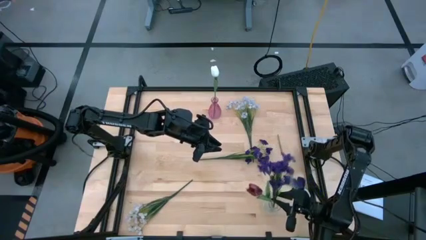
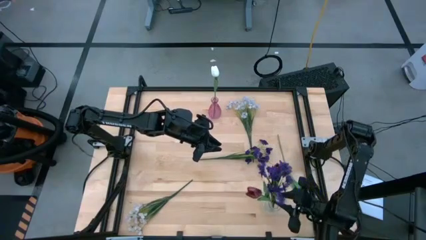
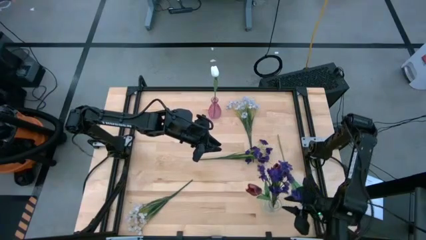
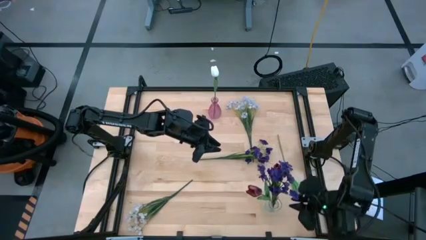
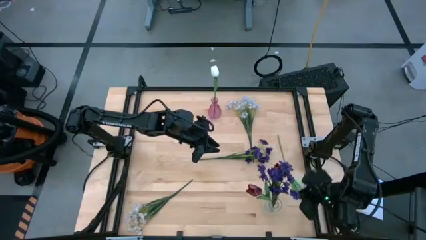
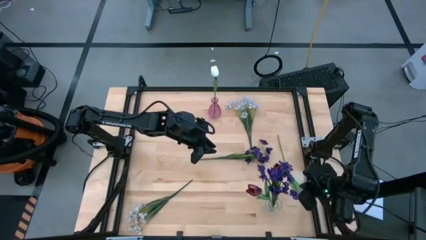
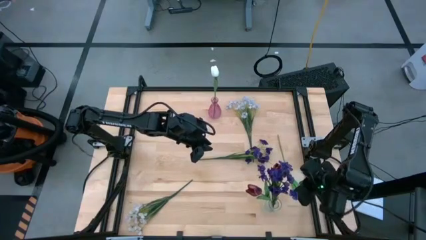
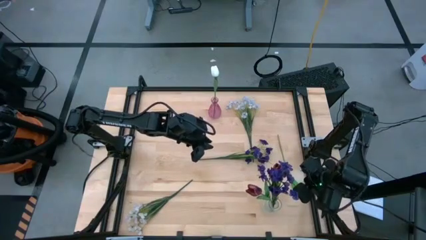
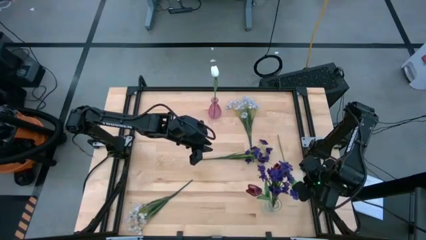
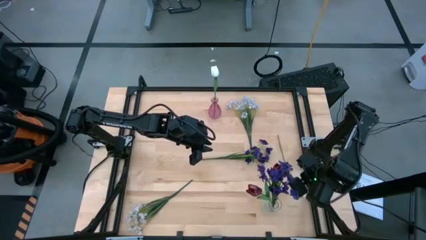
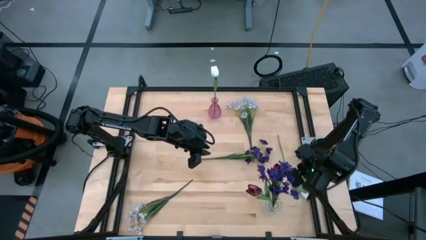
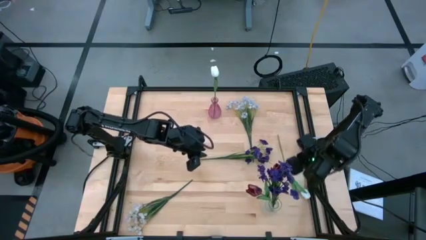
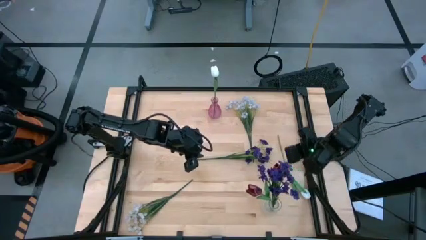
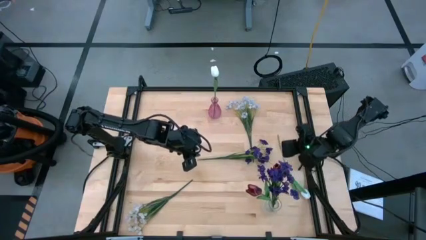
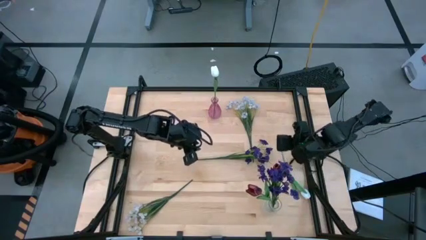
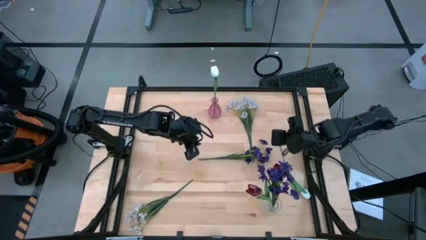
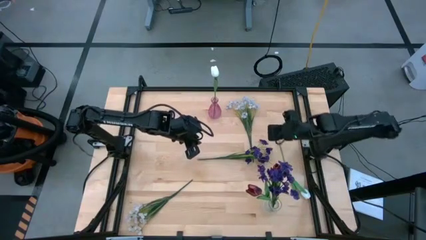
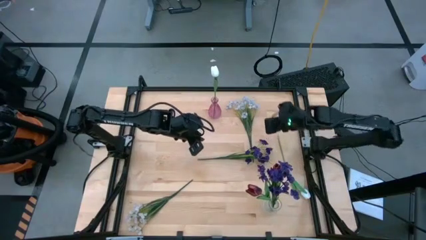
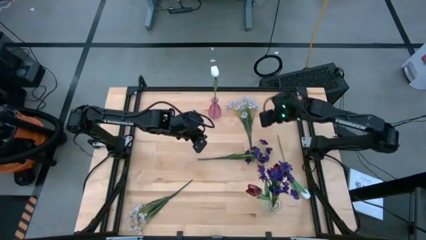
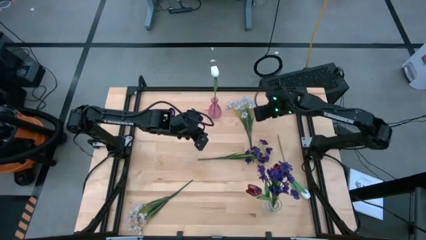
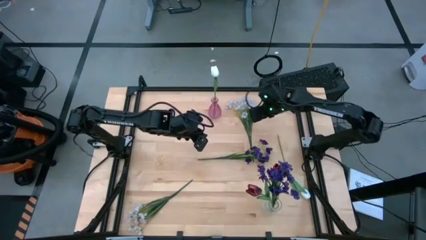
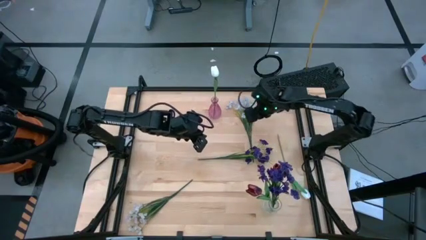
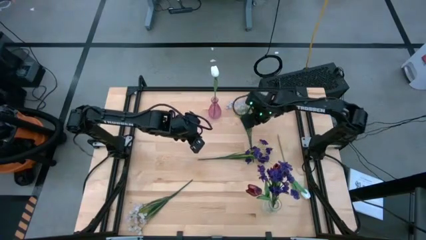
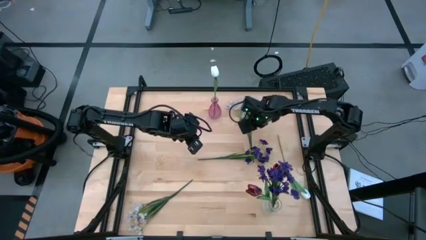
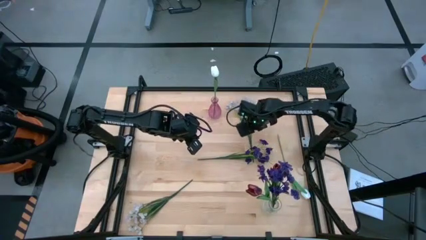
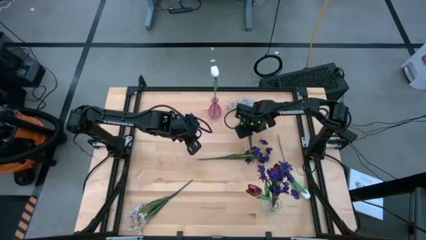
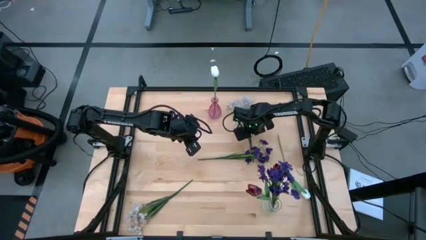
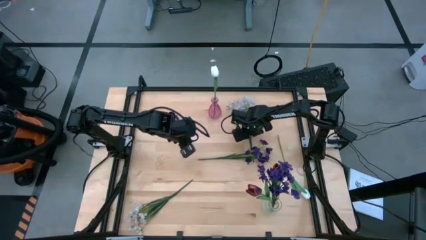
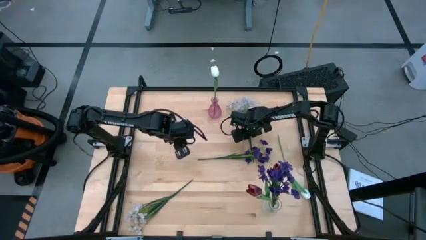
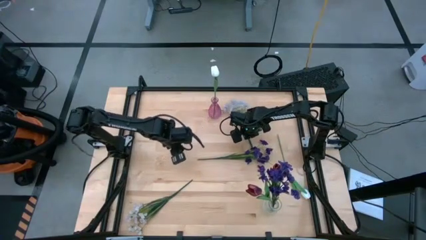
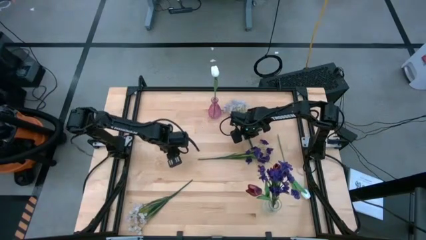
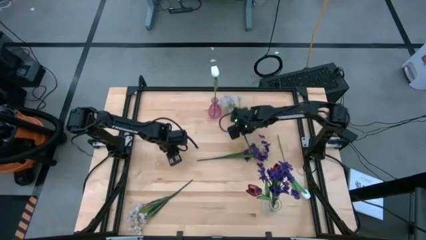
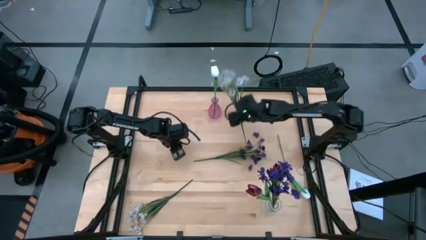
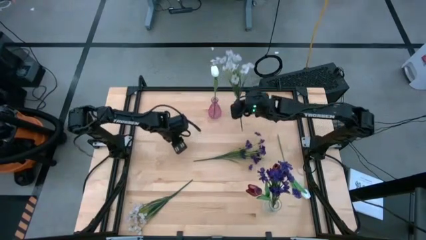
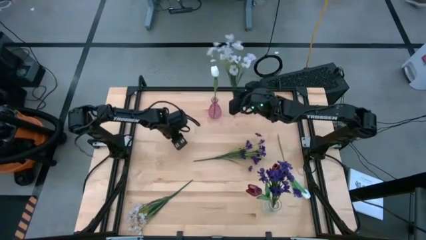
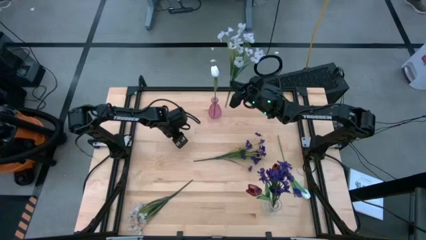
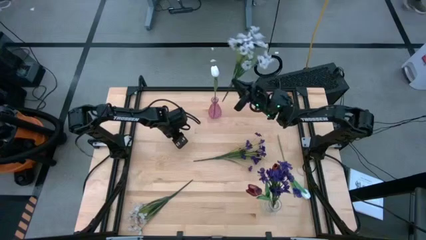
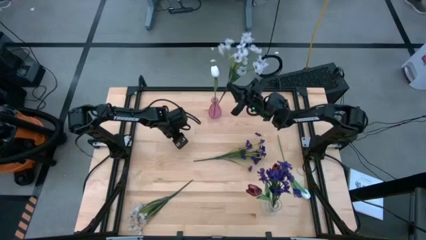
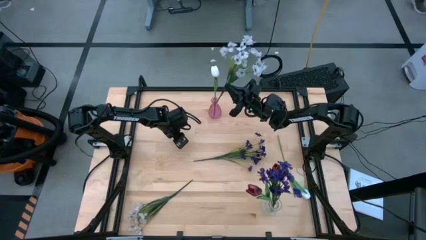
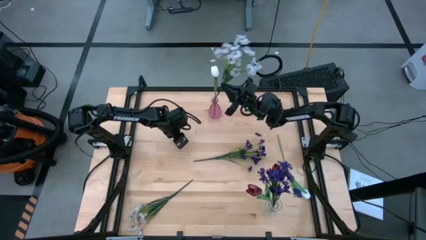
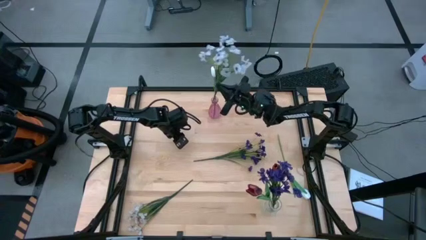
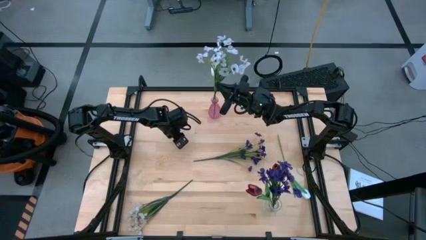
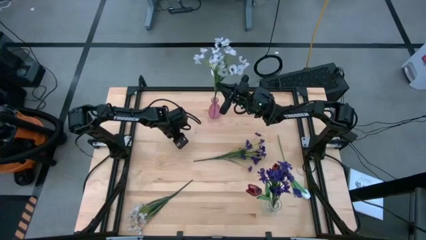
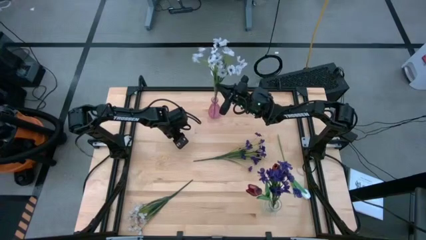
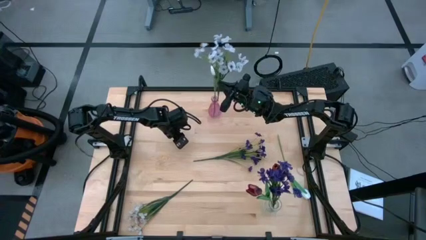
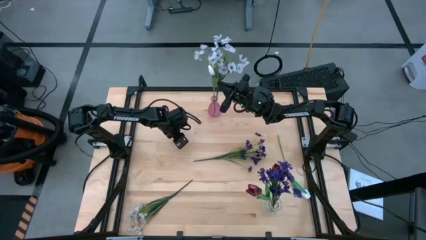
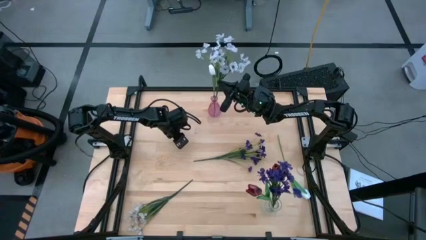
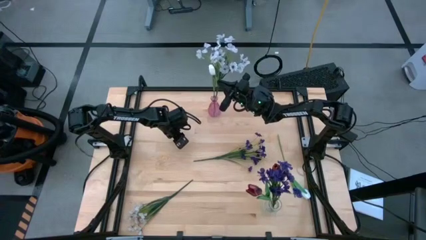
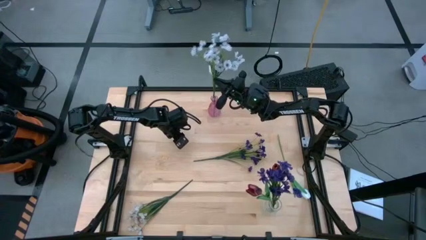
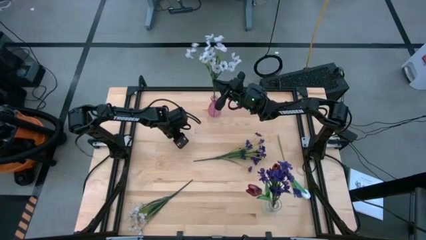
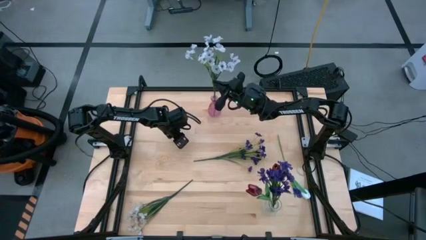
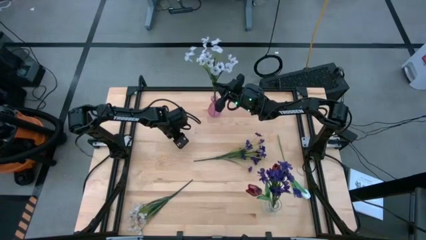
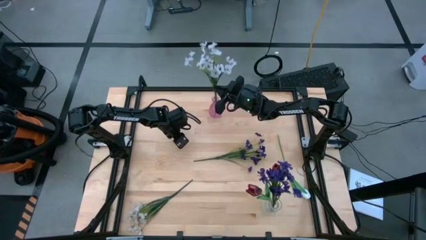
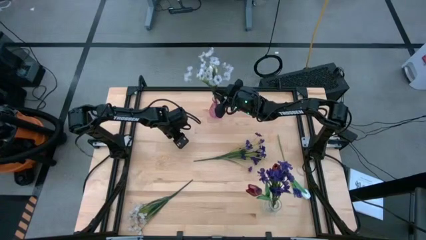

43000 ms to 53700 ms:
Task: Sort flowers into vase by color
Put the top white flowers into the pink vase

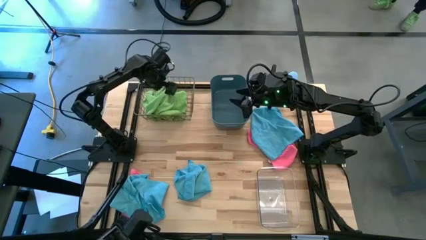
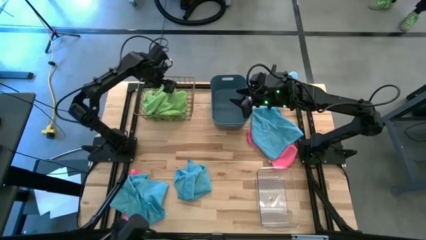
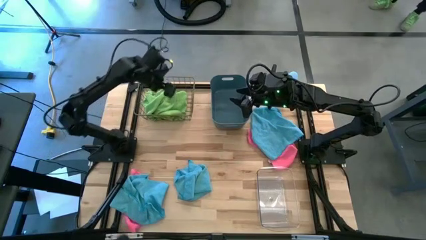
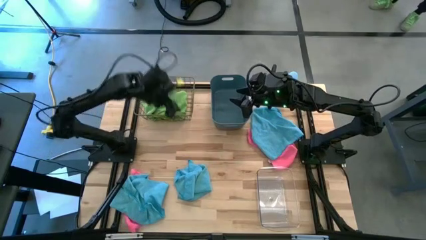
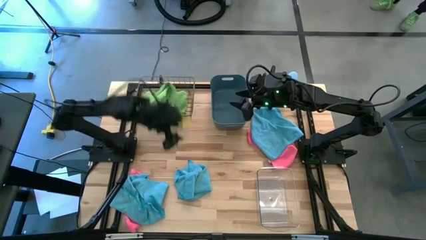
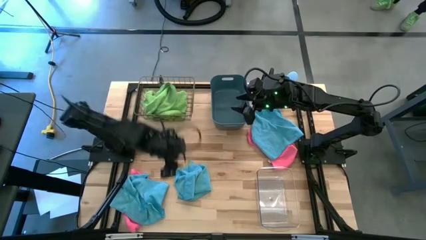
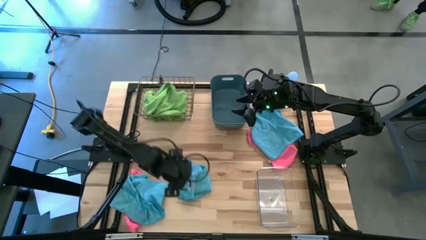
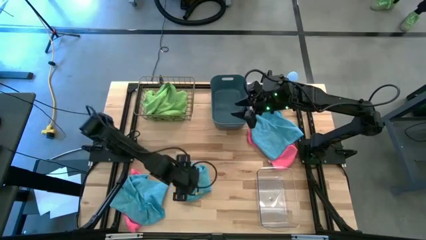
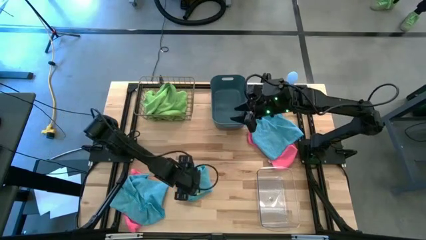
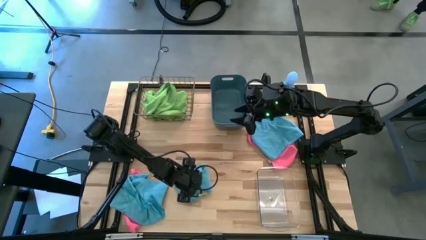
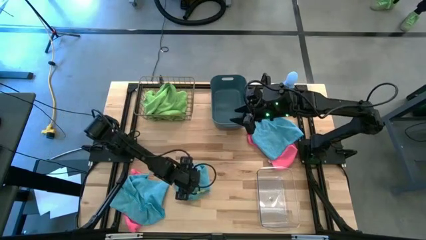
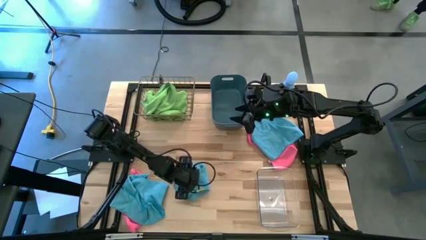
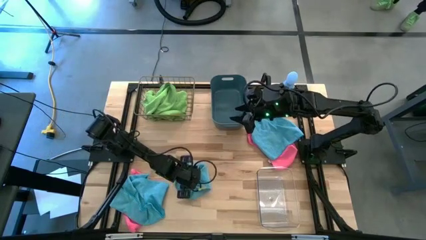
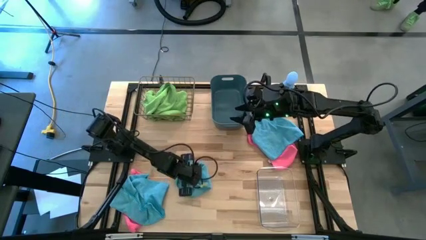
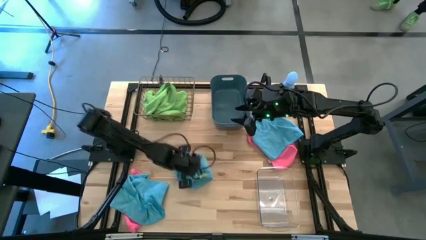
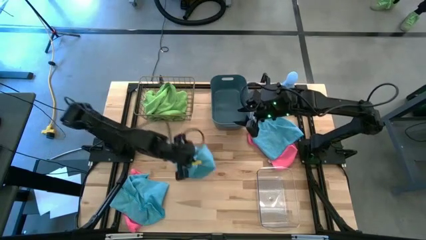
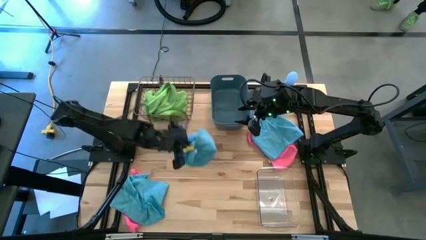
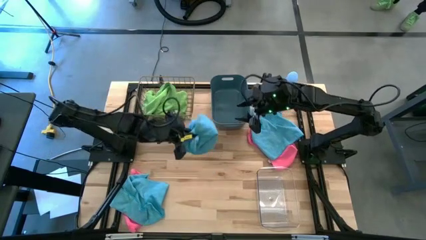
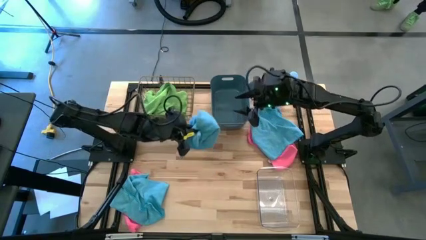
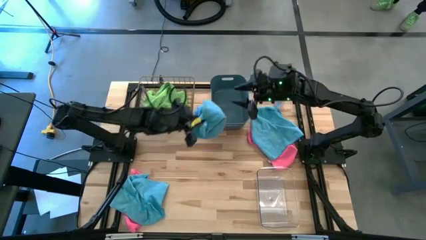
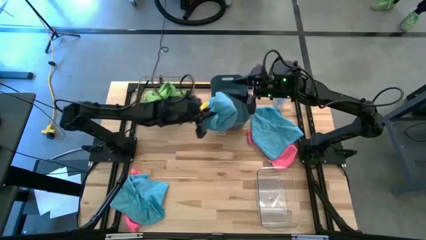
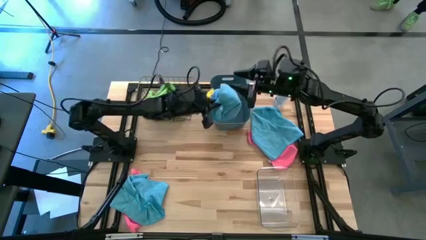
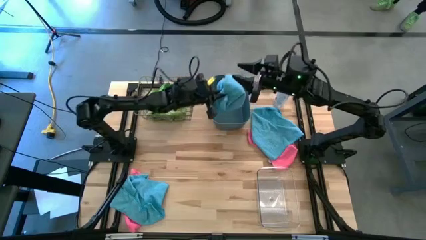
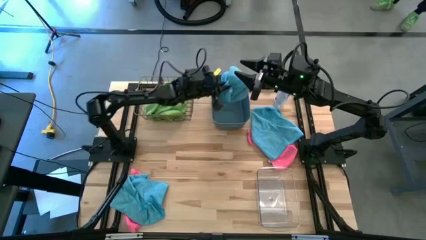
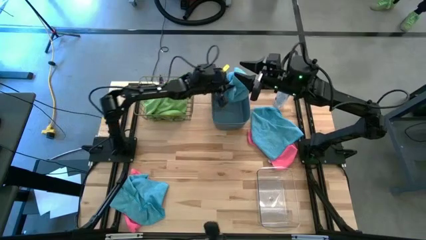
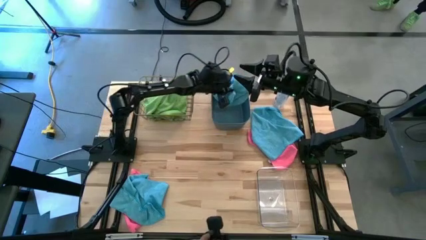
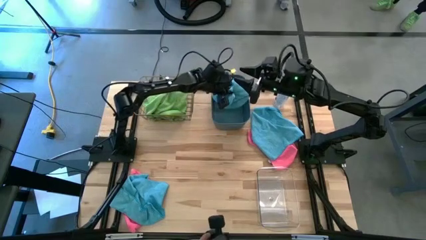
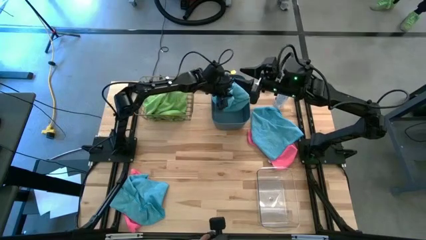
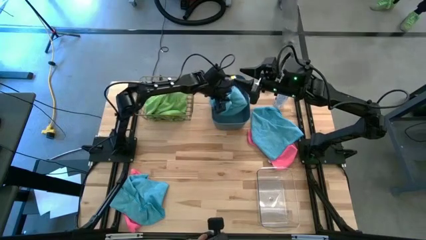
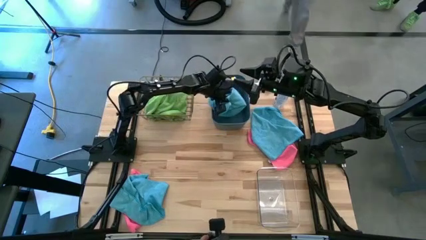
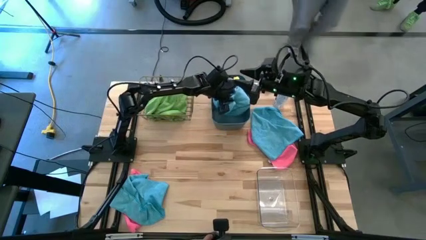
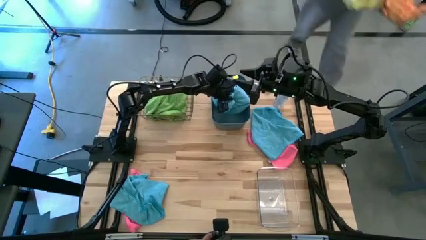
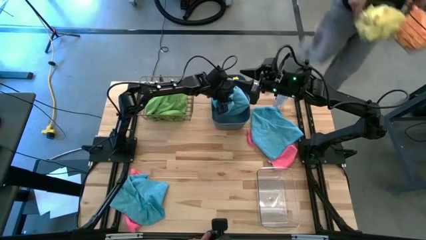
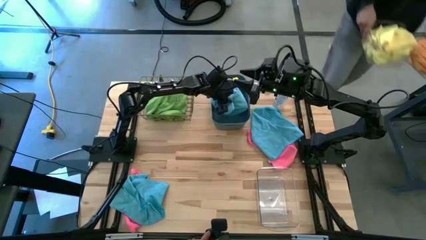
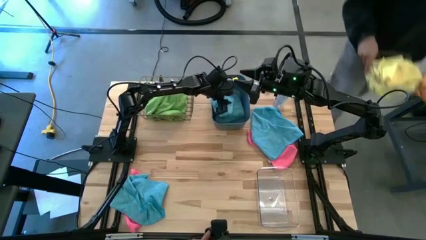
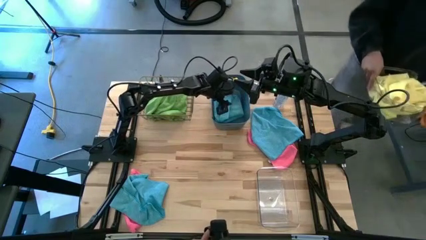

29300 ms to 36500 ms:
Task: Sort microfiber towel by color & place in baskets
Put the center blue microfiber cloth into the blue bin
